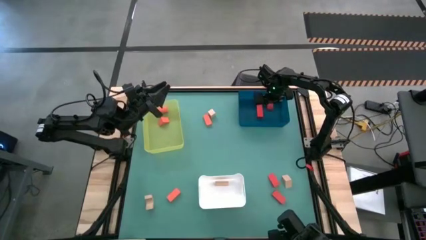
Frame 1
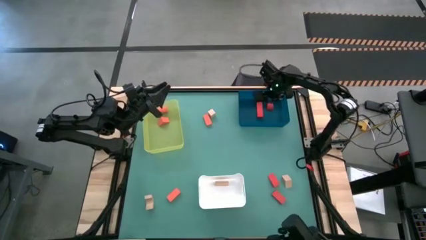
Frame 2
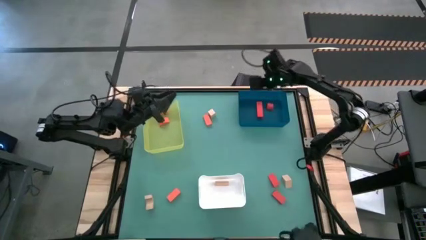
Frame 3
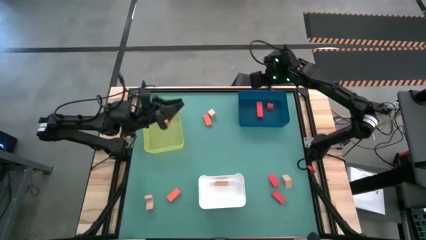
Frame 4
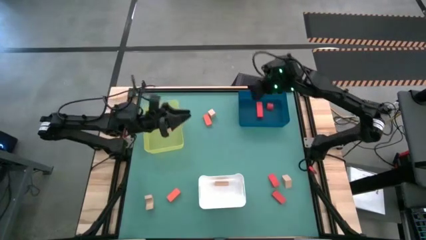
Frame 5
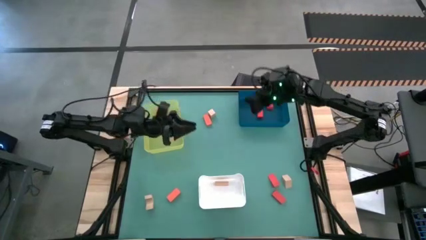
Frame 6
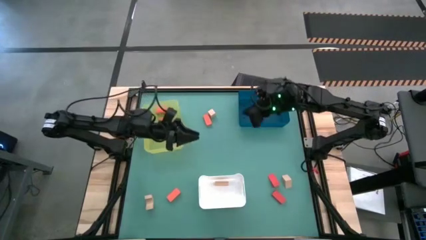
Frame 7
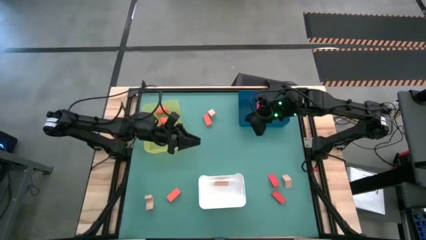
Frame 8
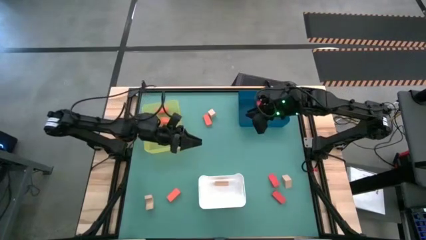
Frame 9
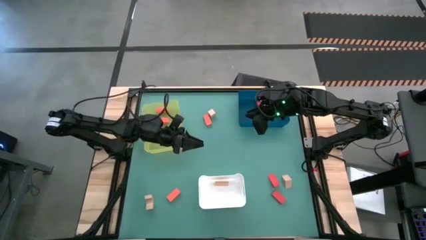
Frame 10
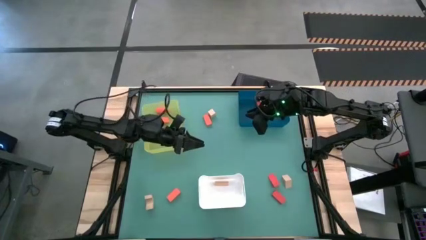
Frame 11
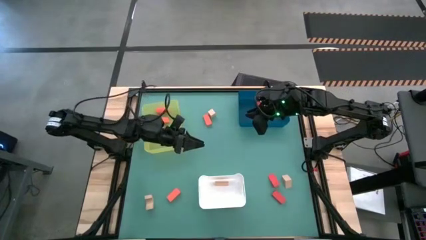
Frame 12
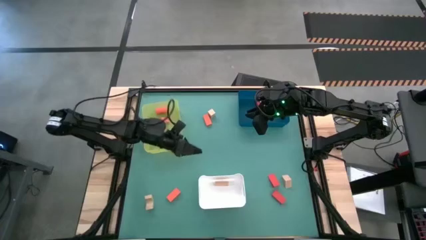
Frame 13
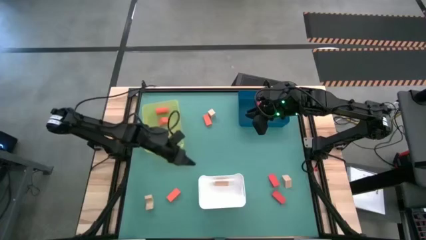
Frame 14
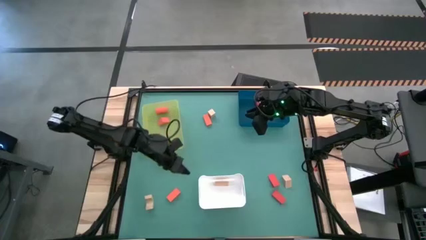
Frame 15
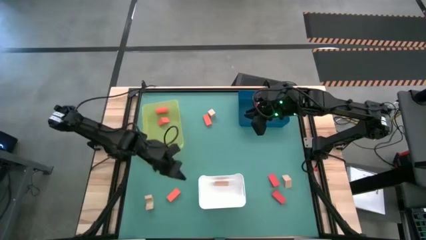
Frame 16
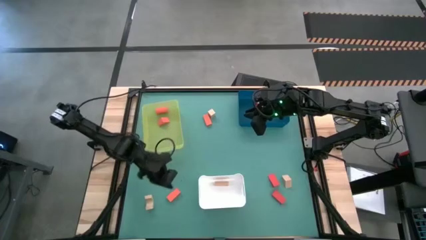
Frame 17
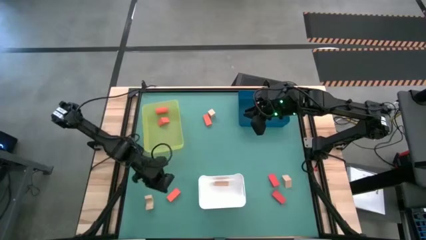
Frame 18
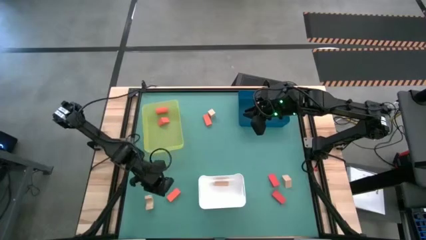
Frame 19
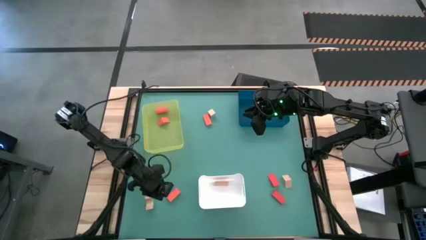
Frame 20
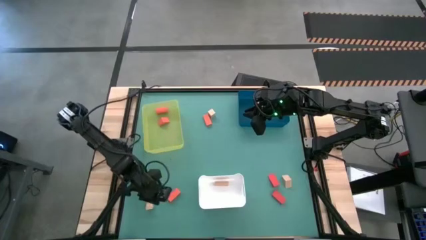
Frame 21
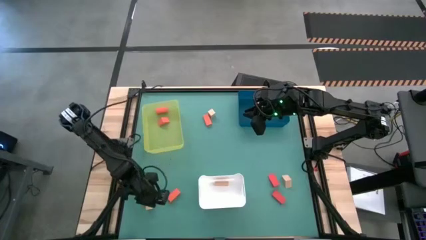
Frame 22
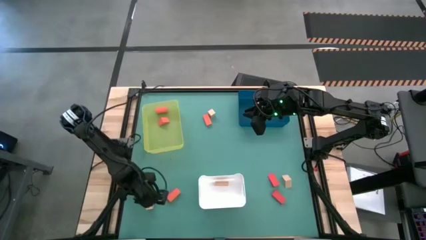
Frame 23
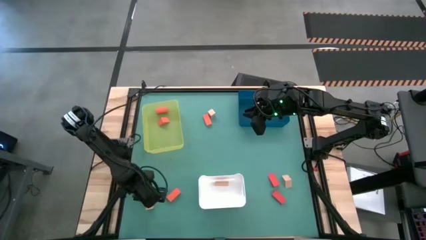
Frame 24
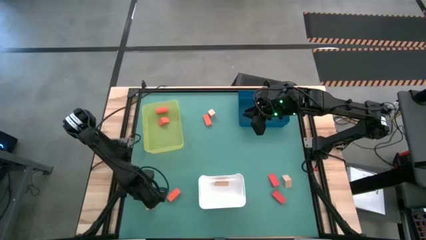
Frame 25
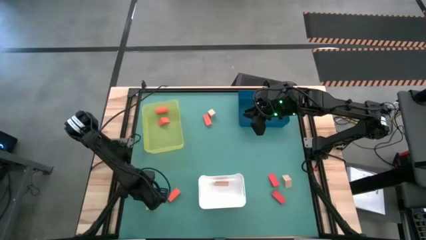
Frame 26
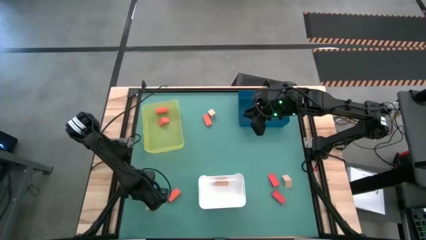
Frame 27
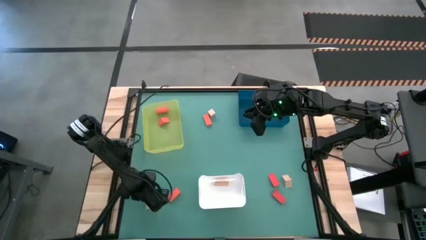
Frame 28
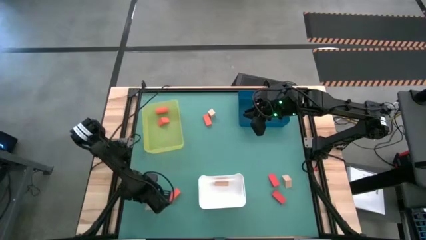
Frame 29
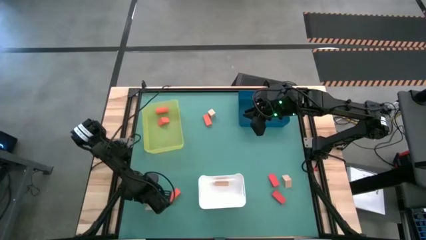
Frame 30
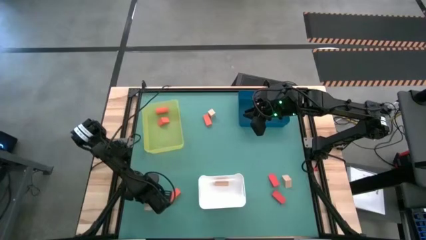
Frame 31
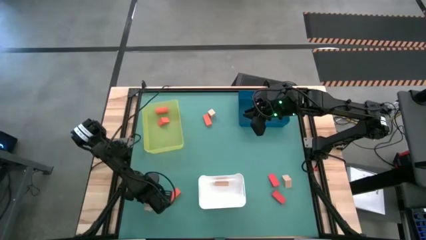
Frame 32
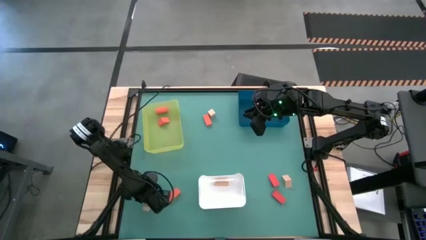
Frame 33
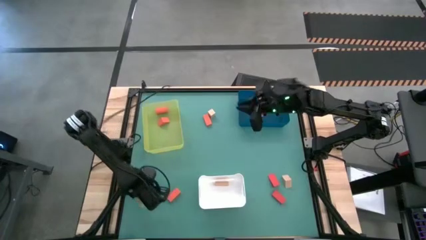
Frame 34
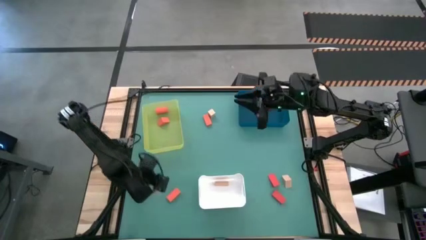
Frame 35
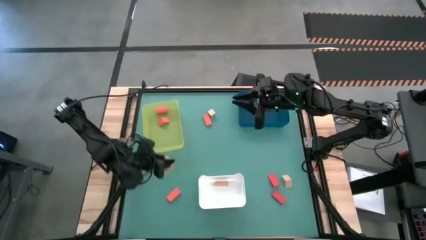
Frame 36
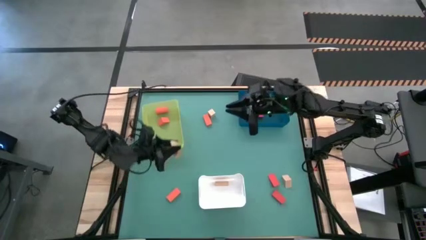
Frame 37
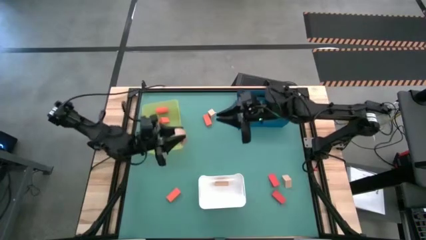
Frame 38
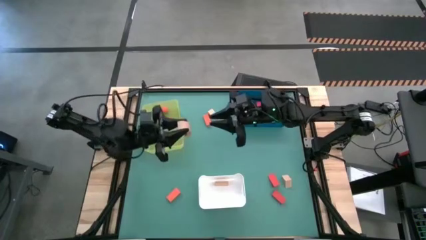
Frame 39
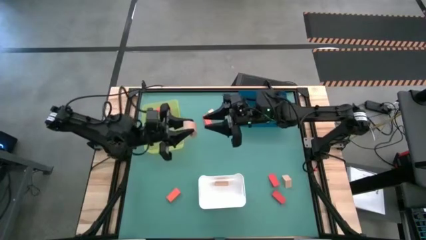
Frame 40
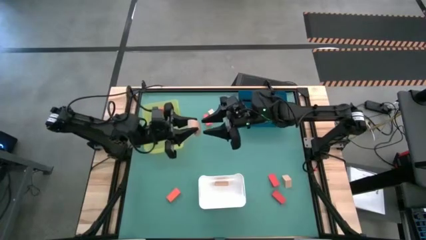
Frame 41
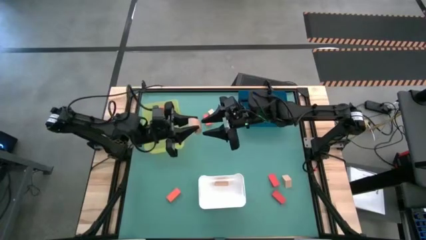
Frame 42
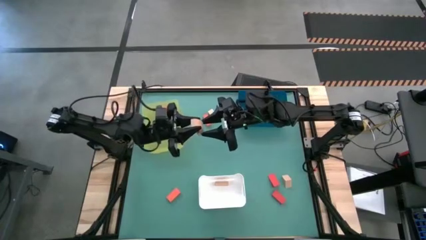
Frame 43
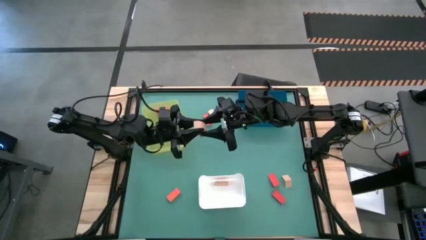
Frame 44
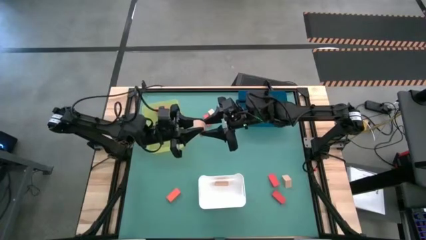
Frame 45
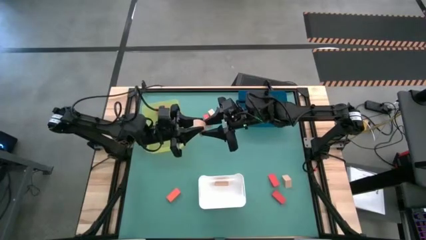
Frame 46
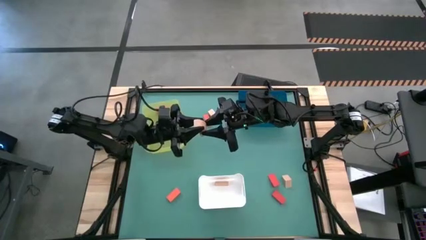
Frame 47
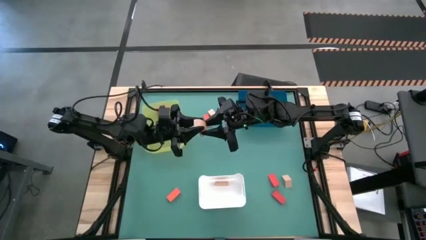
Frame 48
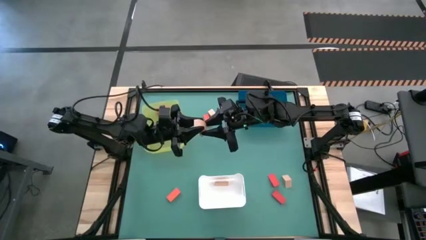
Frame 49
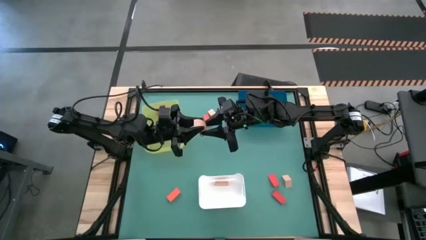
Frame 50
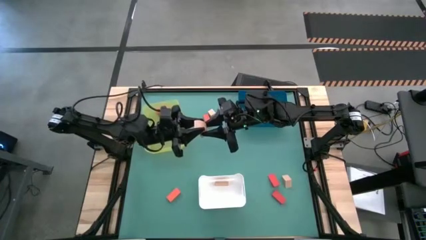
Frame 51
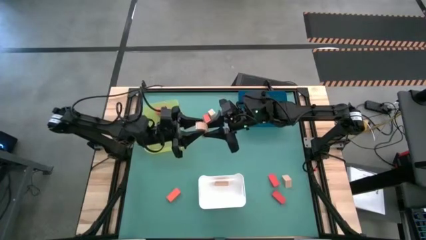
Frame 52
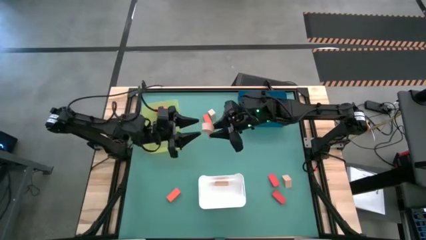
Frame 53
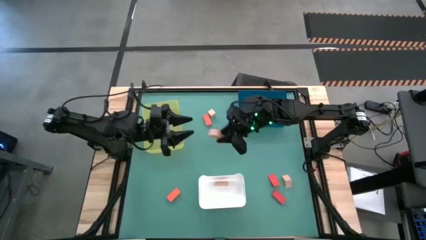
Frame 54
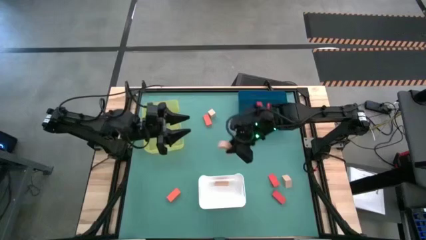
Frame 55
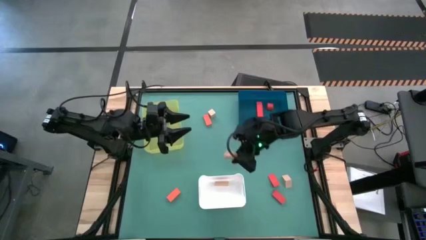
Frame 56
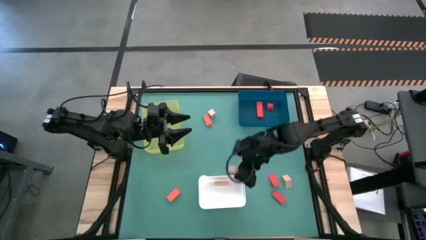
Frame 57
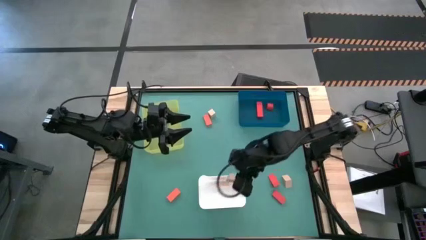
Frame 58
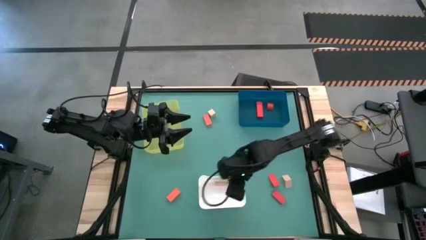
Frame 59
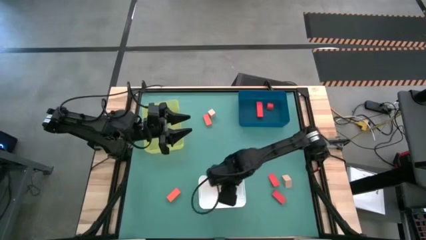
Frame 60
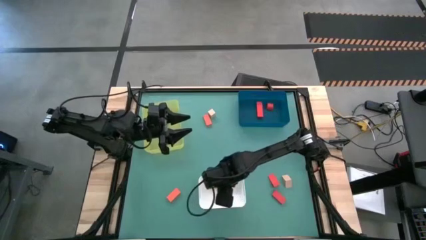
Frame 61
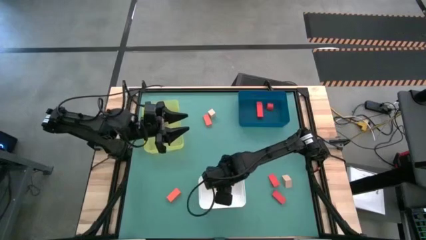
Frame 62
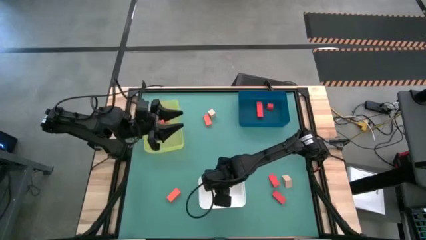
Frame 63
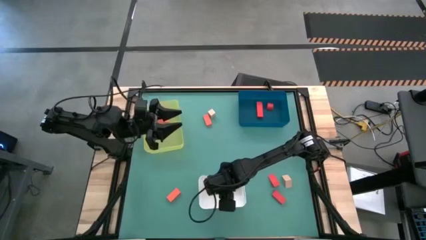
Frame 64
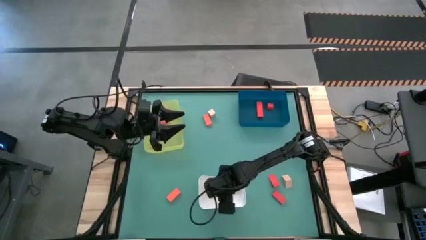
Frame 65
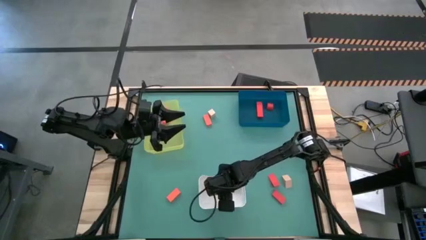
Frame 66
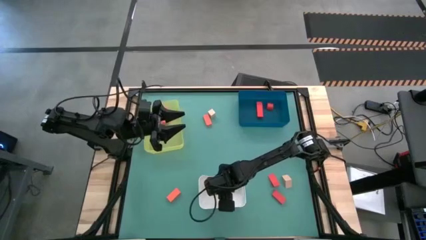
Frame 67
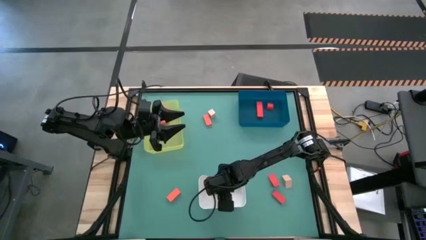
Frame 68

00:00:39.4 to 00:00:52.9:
Task: Sort & place blocks by color
Put the brown block into the white bin

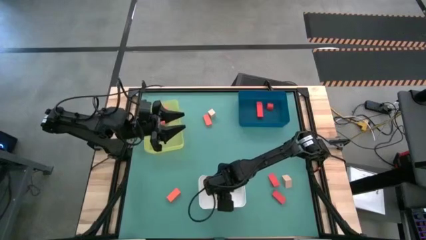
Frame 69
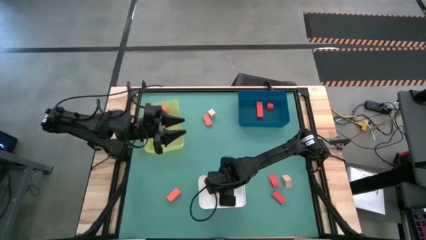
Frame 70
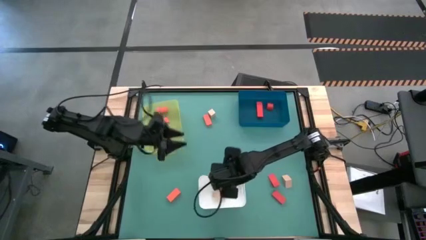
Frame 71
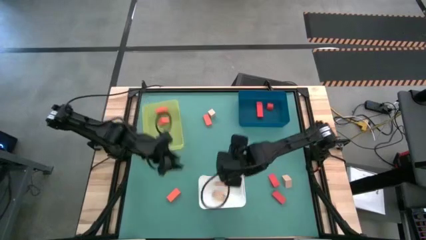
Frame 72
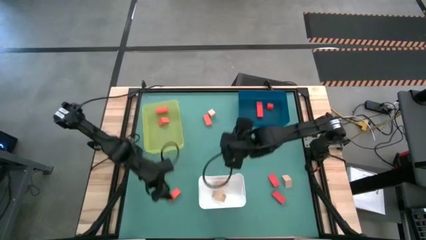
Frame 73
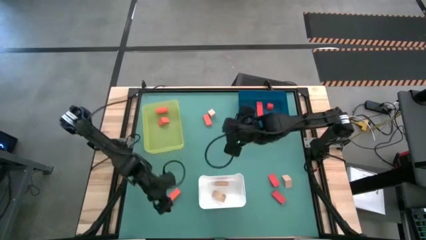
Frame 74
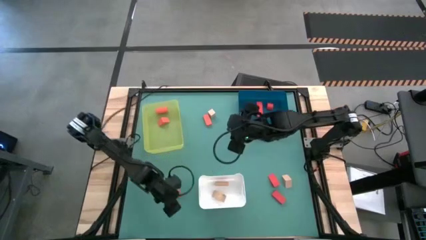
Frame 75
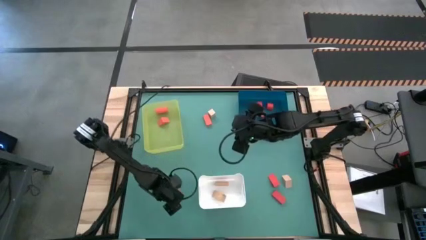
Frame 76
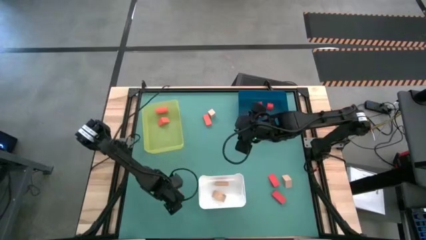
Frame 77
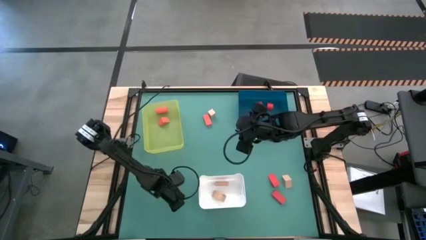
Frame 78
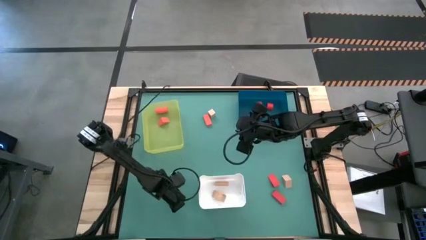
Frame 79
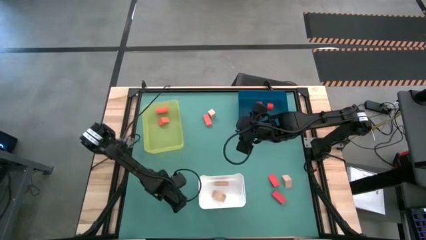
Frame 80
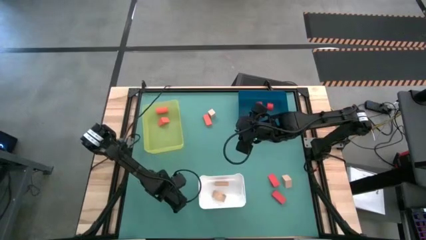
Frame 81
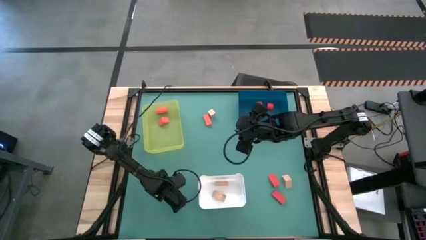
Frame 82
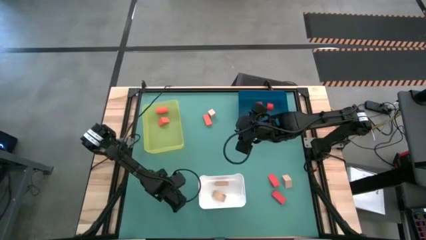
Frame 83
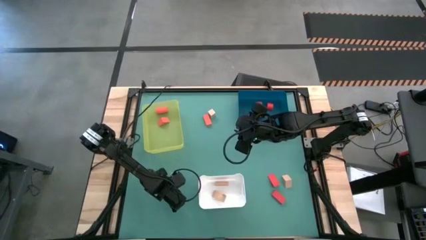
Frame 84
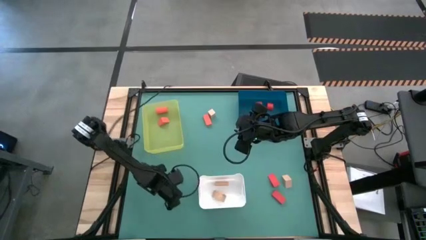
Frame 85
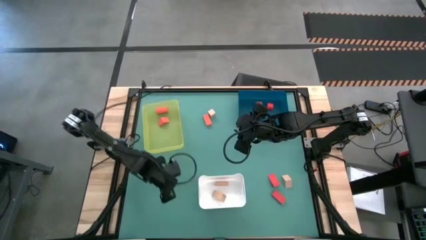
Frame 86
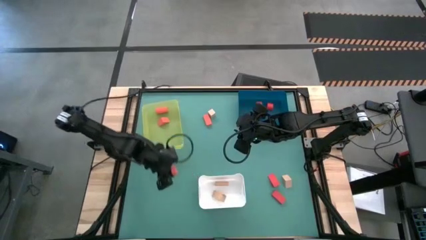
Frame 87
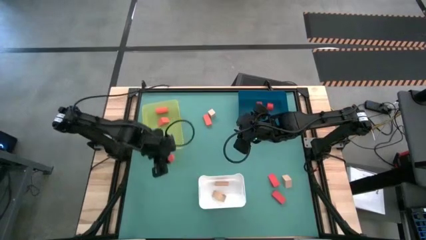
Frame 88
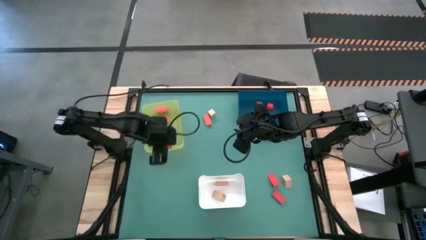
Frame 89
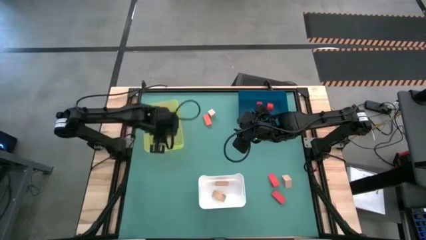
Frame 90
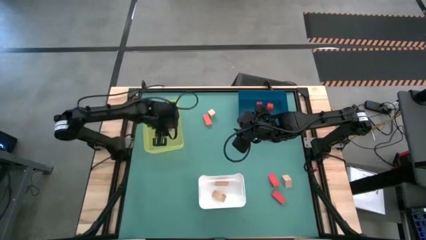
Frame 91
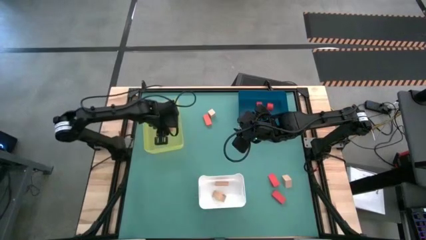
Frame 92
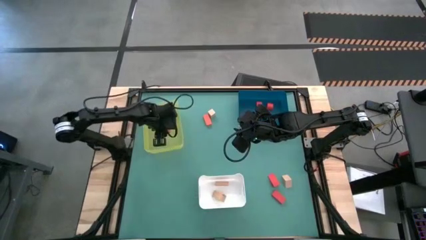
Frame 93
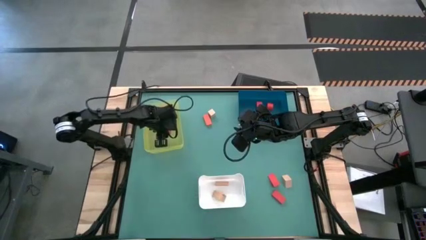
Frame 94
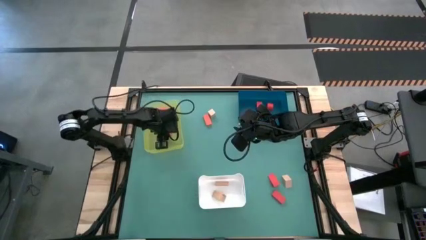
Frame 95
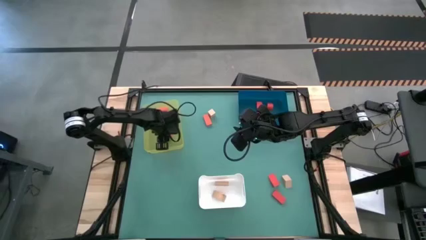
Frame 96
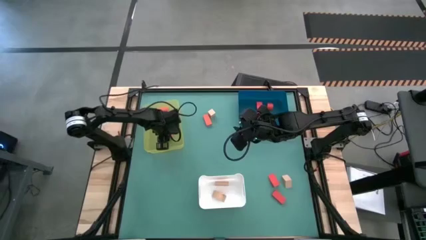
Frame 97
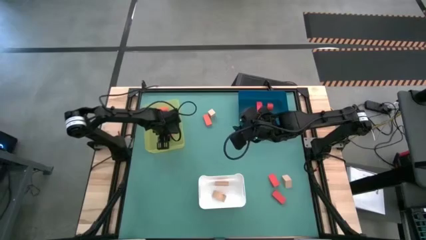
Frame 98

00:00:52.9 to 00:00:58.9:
Put the orange block into the yellow bin
